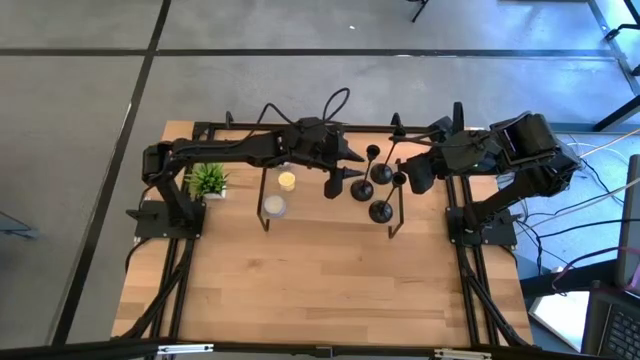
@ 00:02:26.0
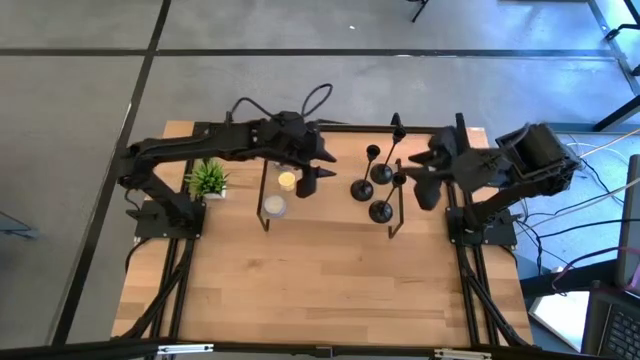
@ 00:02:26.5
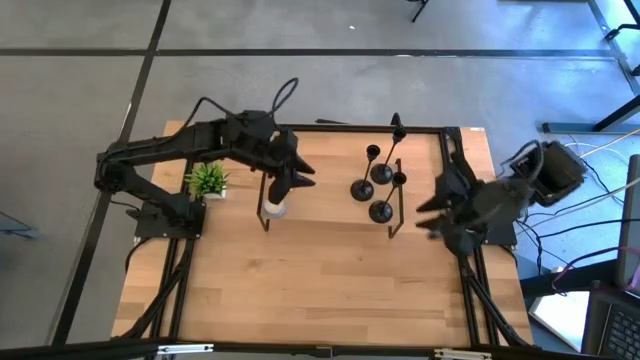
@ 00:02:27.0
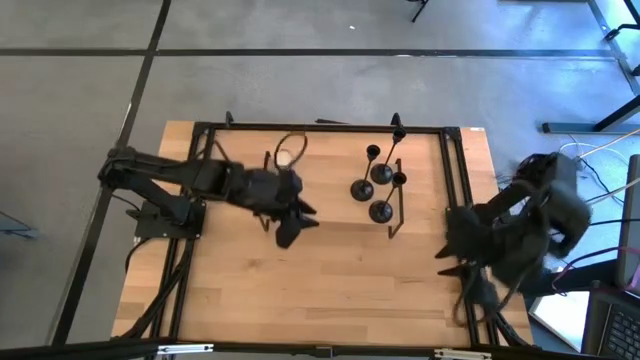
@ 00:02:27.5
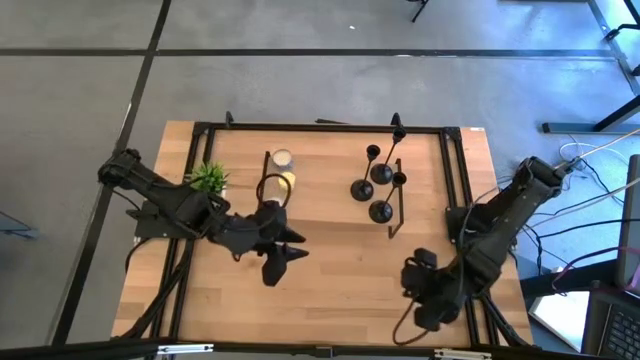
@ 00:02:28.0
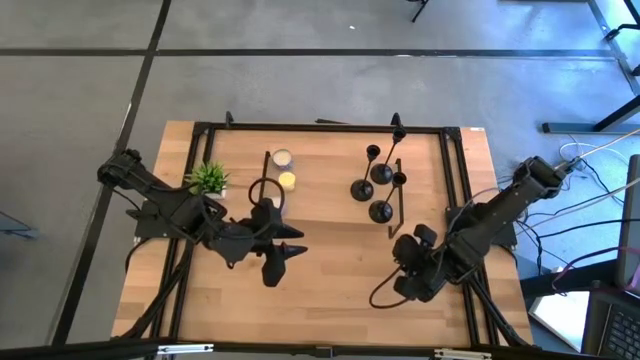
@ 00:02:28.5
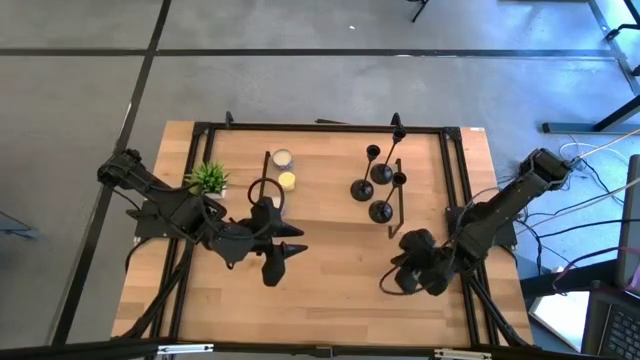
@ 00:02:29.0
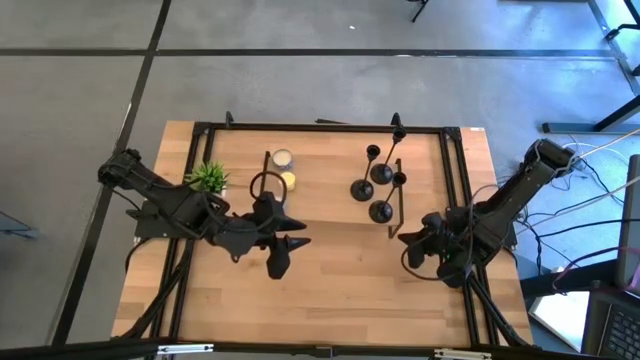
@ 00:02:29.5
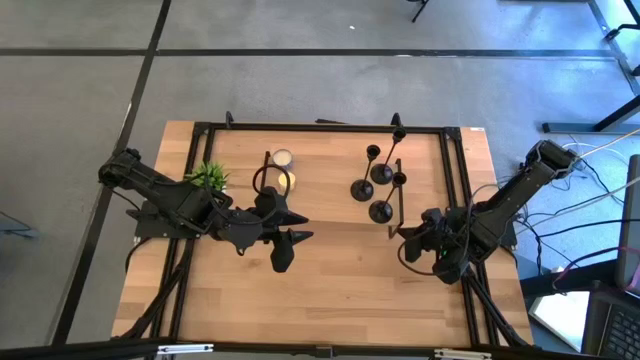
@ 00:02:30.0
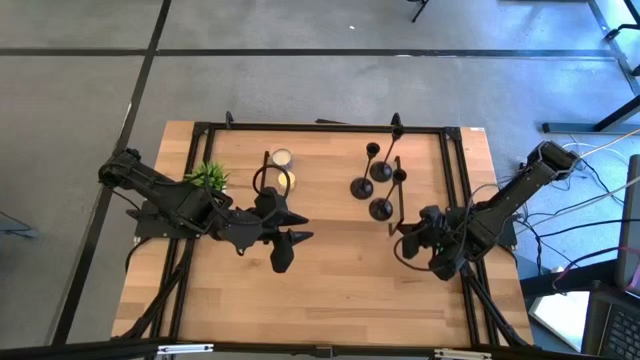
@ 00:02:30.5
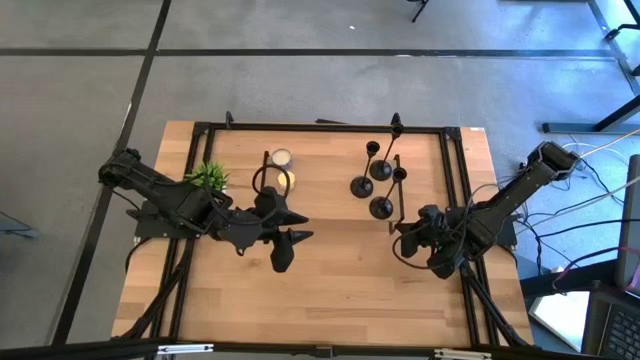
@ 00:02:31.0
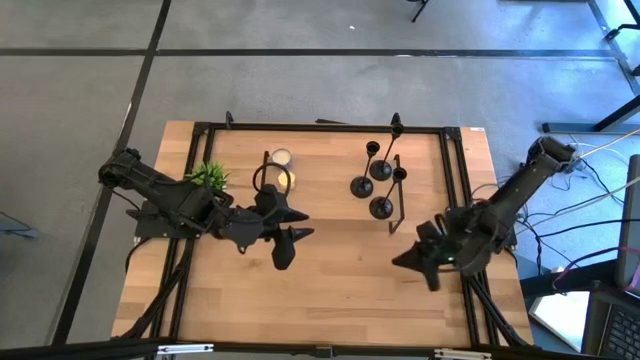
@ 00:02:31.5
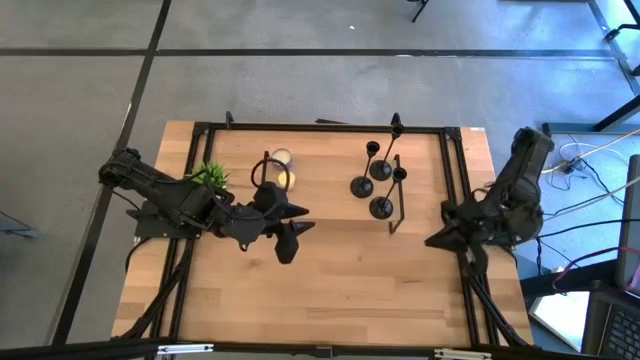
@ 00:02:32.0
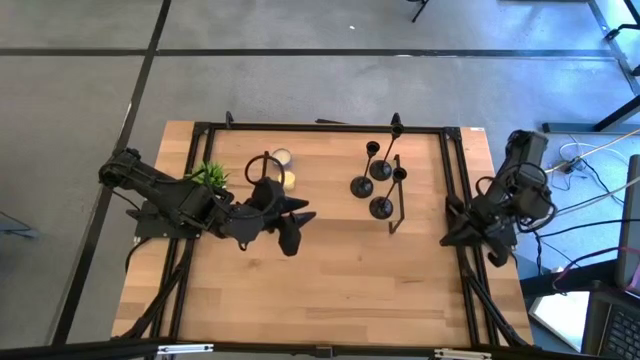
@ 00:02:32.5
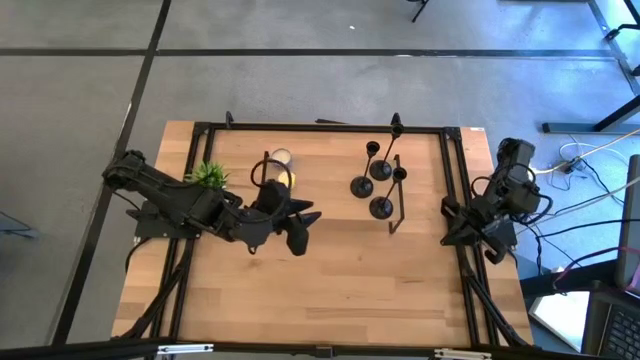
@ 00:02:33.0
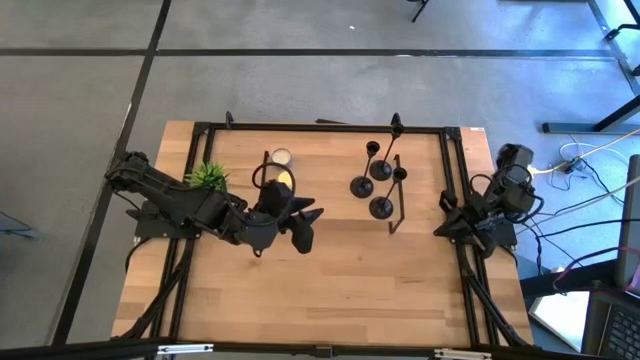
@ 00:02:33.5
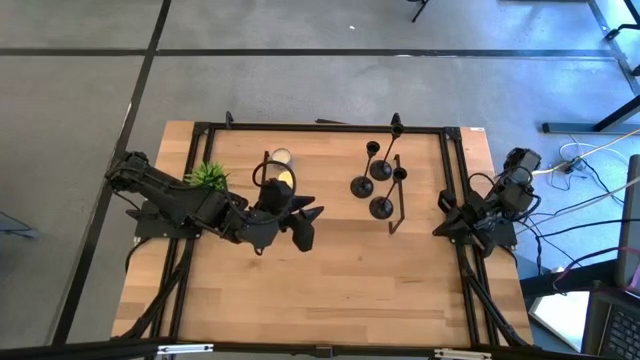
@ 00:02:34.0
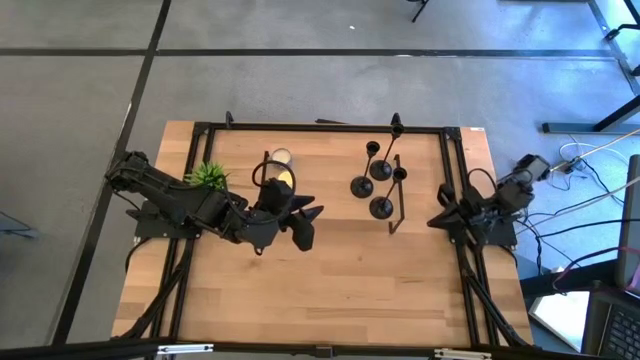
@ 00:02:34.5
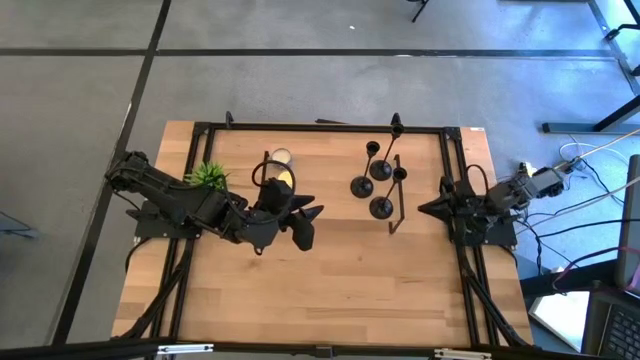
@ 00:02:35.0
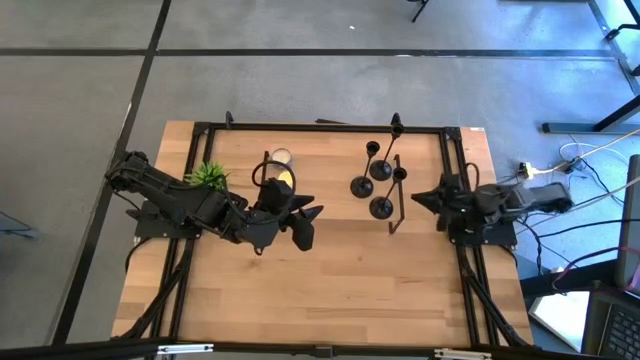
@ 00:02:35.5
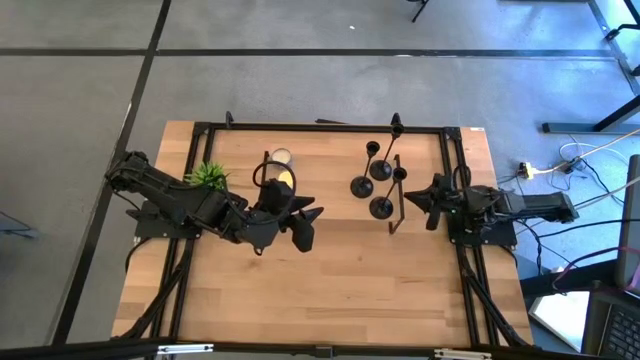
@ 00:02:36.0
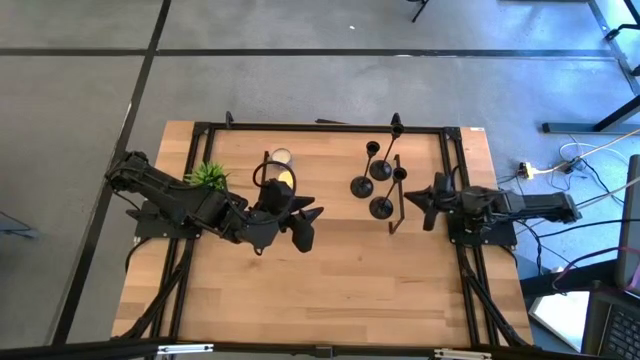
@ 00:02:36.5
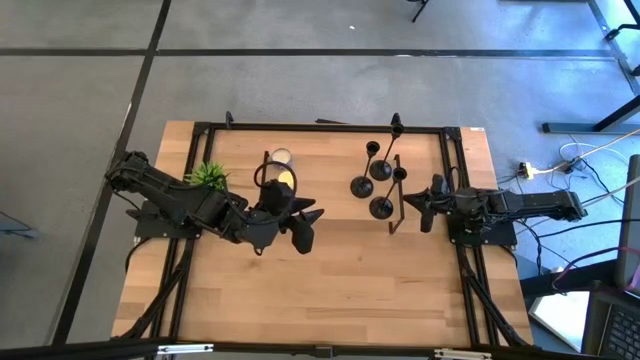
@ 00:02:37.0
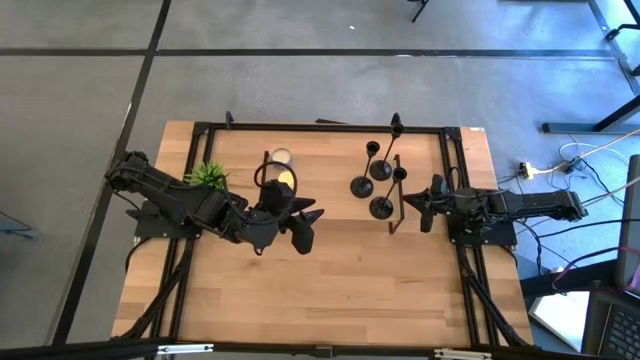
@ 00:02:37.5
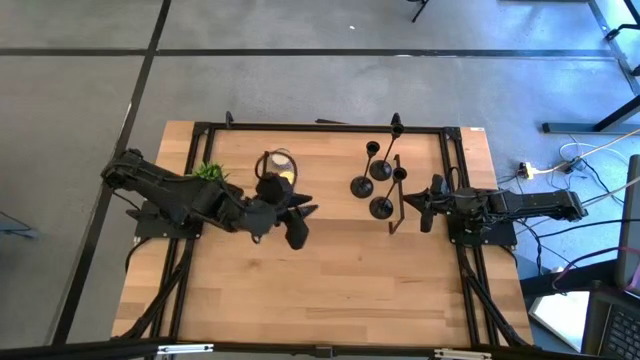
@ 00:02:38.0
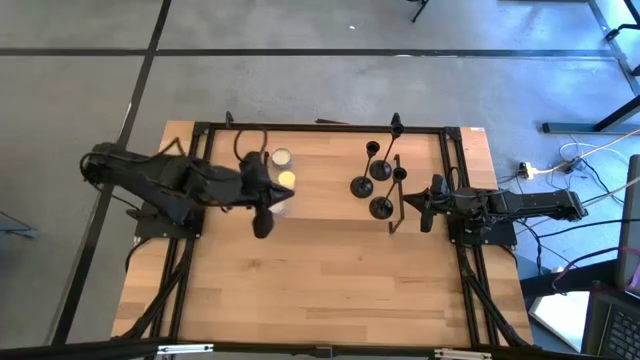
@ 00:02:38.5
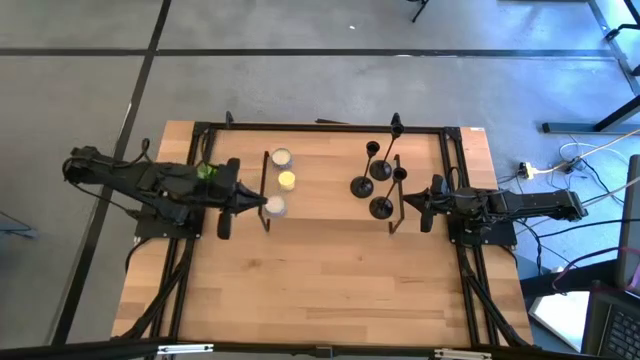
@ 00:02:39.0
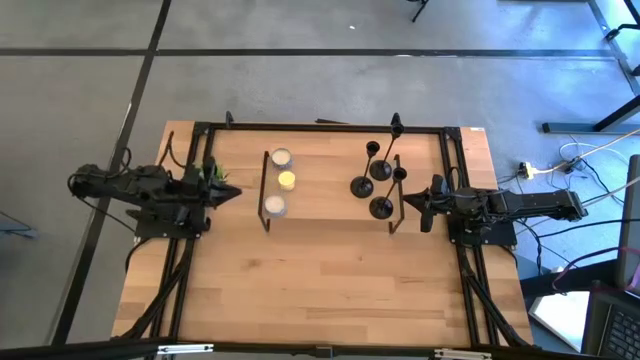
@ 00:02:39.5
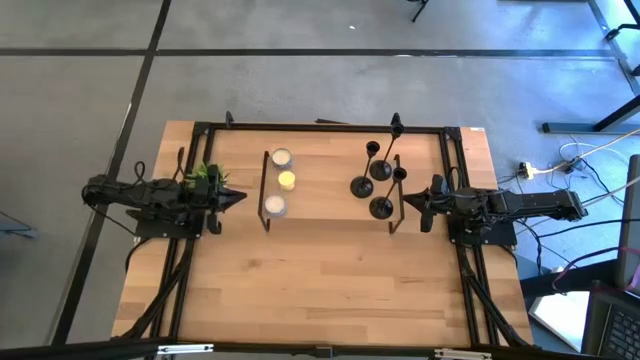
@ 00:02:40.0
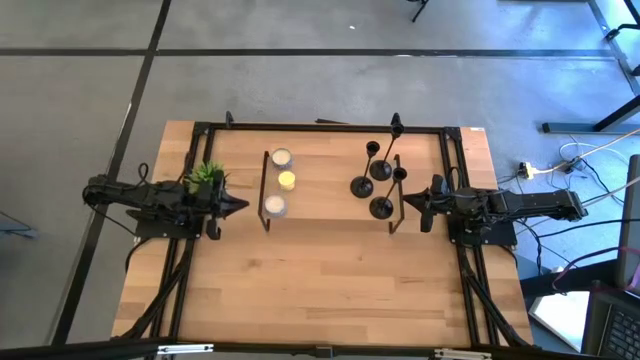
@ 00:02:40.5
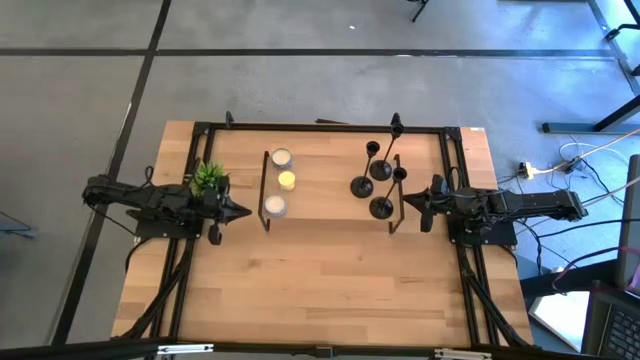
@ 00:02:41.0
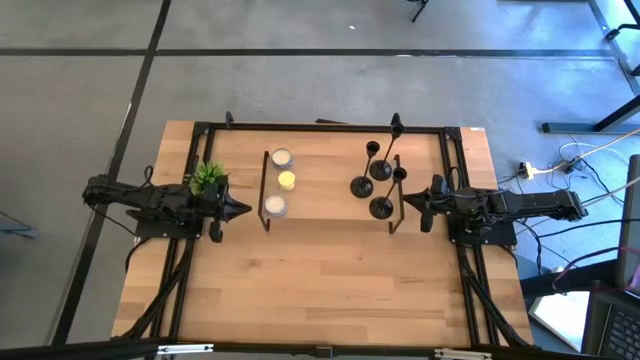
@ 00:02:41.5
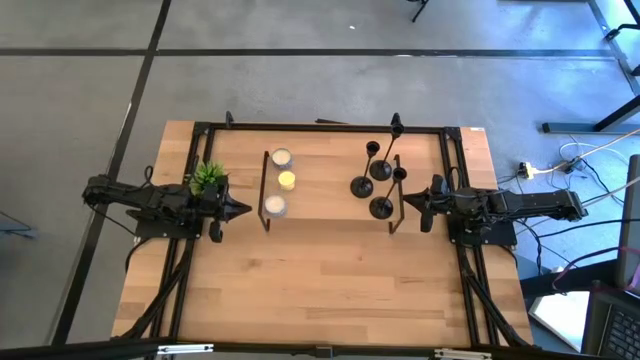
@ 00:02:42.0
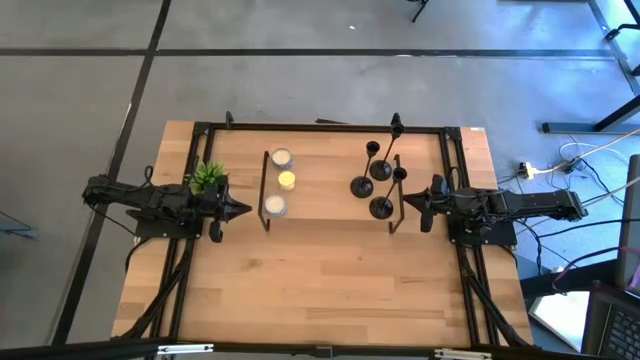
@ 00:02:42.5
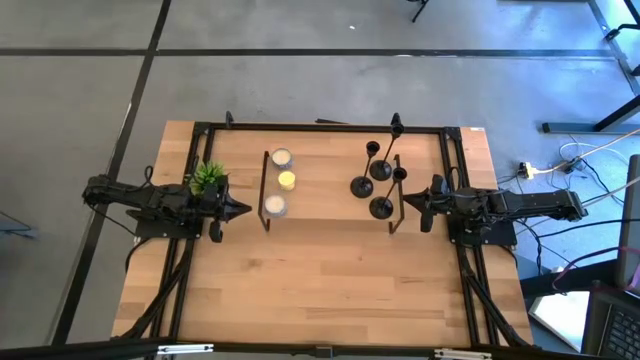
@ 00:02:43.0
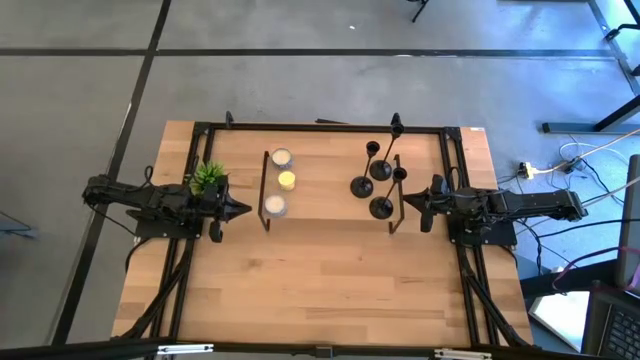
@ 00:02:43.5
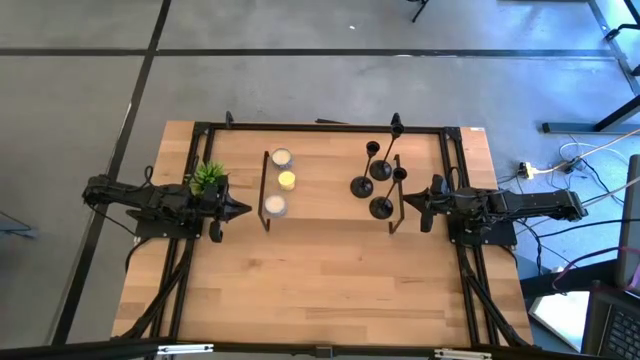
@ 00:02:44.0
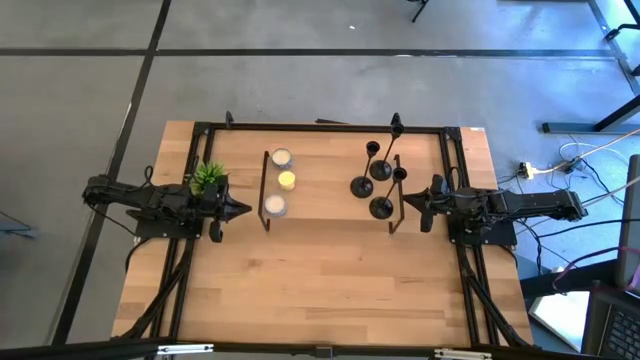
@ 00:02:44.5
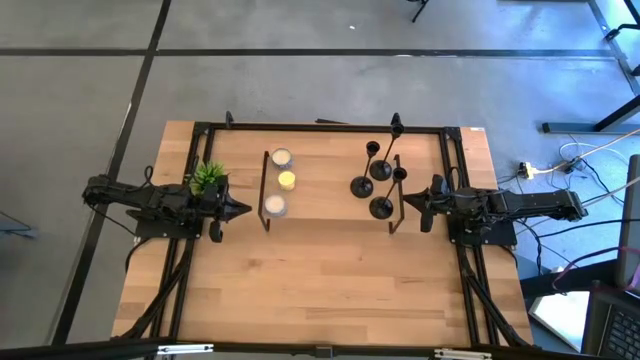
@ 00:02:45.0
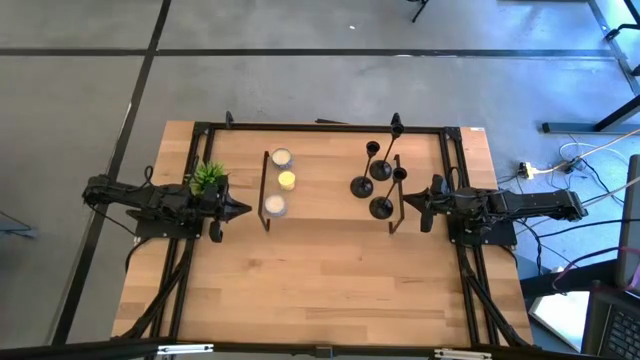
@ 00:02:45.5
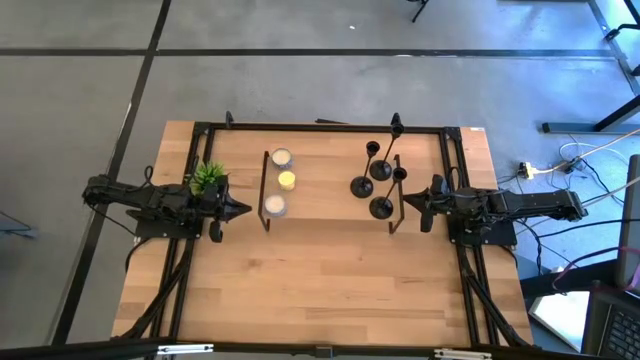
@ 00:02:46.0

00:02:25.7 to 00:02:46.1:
Task: Pick & Place candle stick holders
Return to Home Position
